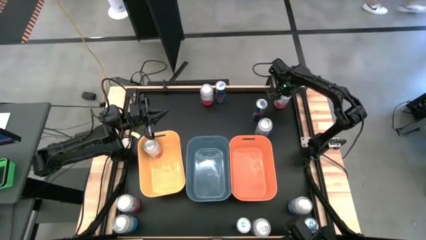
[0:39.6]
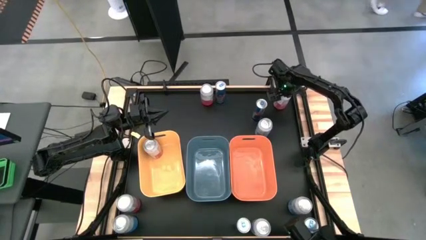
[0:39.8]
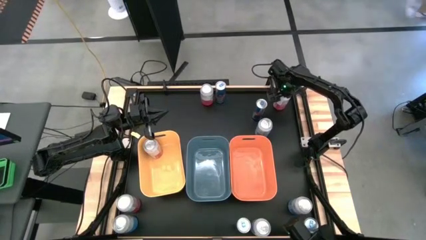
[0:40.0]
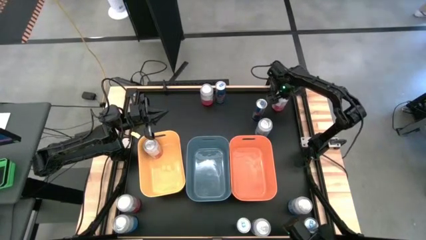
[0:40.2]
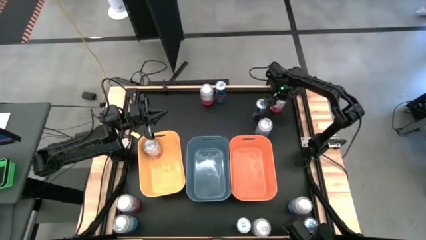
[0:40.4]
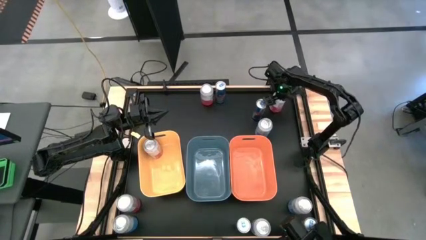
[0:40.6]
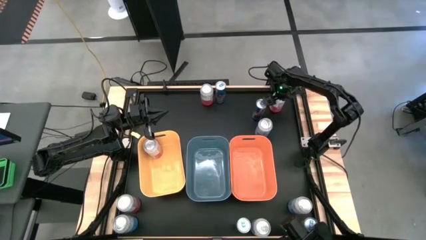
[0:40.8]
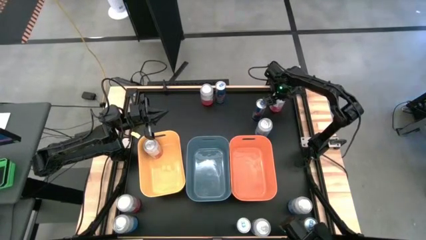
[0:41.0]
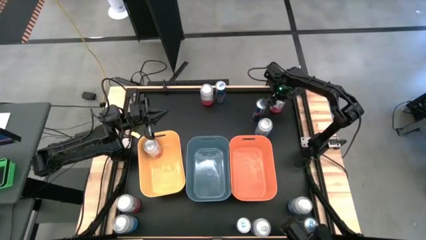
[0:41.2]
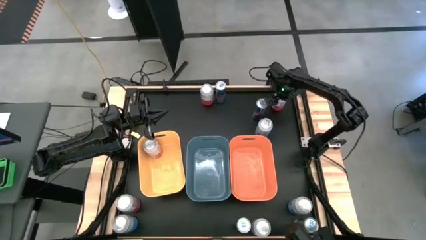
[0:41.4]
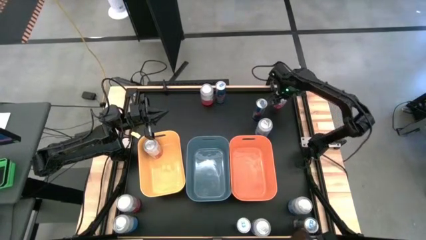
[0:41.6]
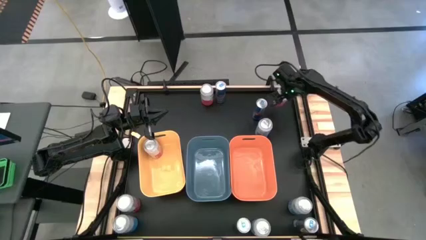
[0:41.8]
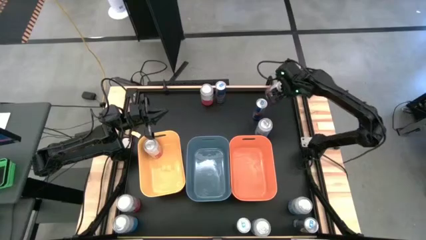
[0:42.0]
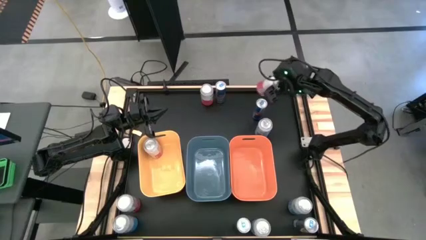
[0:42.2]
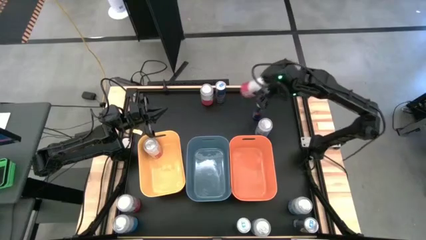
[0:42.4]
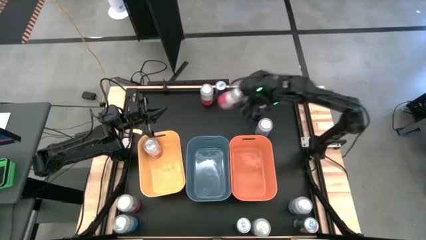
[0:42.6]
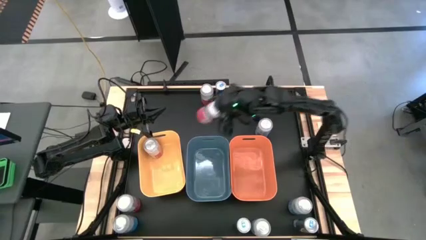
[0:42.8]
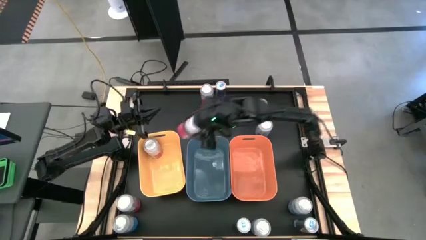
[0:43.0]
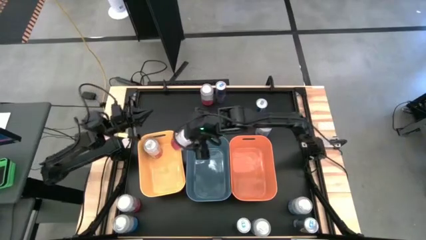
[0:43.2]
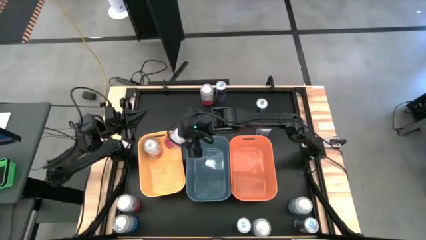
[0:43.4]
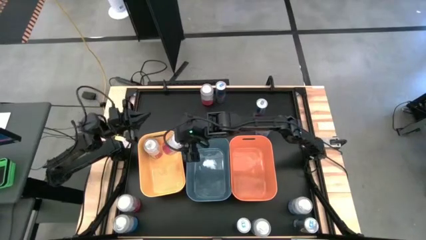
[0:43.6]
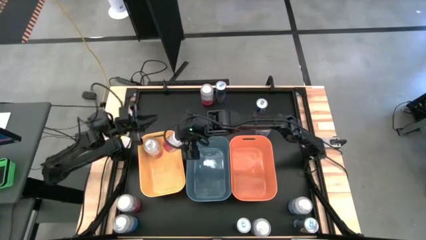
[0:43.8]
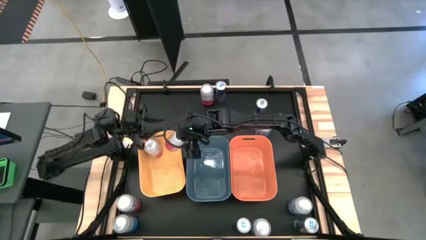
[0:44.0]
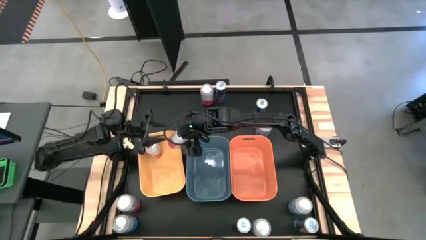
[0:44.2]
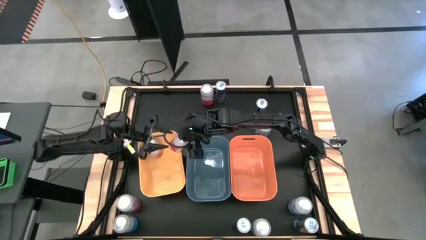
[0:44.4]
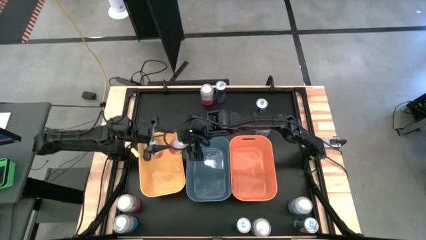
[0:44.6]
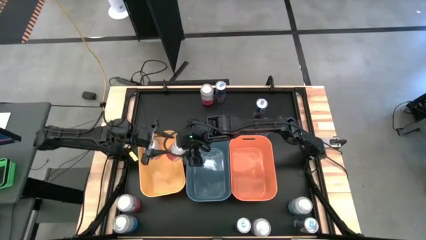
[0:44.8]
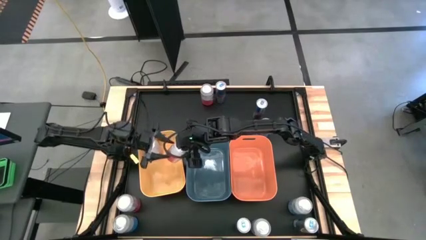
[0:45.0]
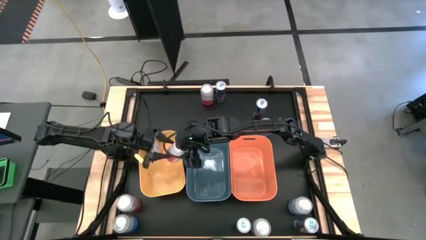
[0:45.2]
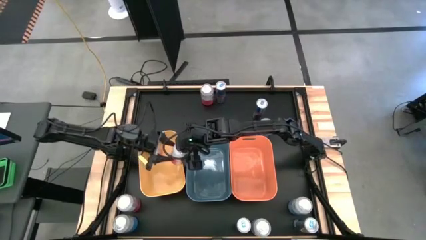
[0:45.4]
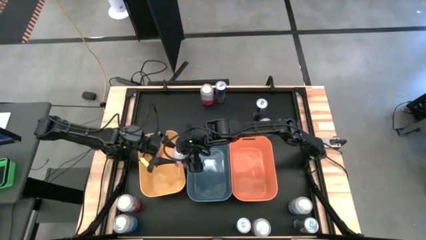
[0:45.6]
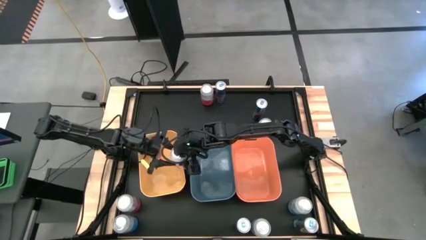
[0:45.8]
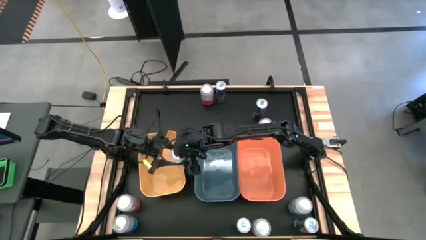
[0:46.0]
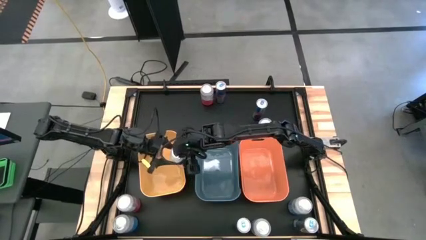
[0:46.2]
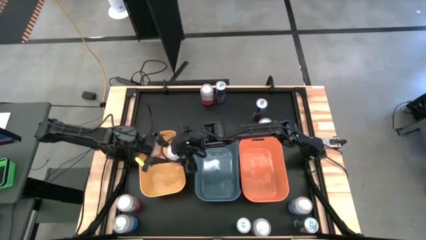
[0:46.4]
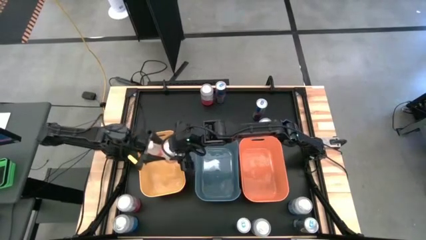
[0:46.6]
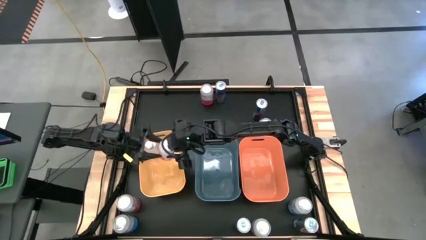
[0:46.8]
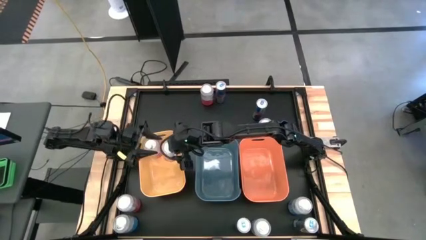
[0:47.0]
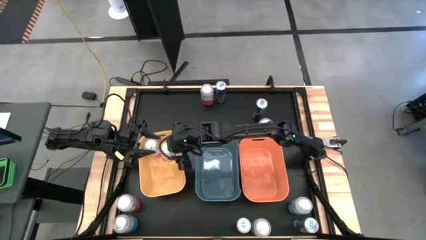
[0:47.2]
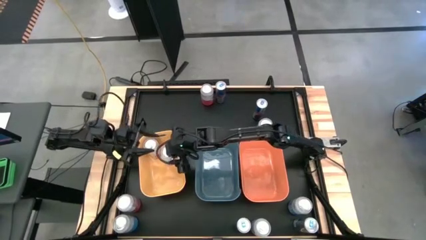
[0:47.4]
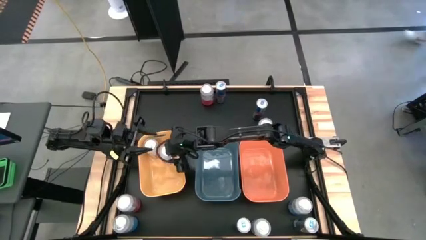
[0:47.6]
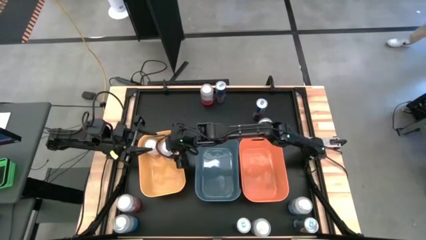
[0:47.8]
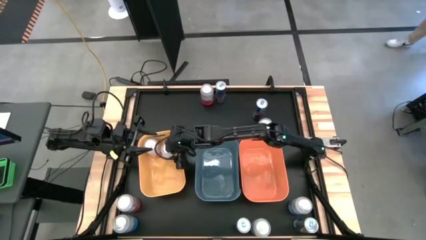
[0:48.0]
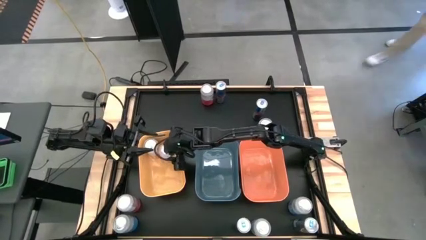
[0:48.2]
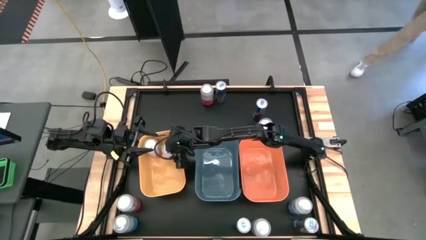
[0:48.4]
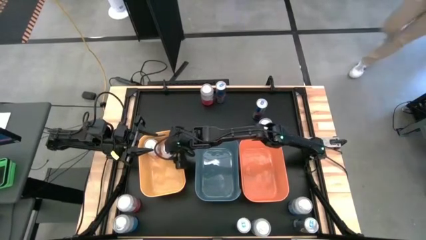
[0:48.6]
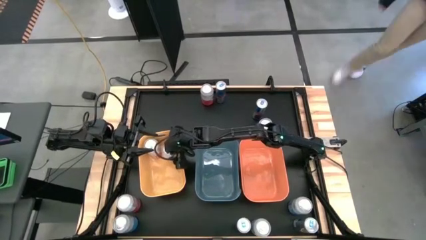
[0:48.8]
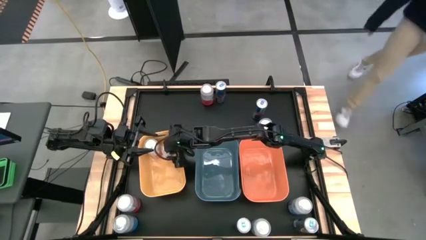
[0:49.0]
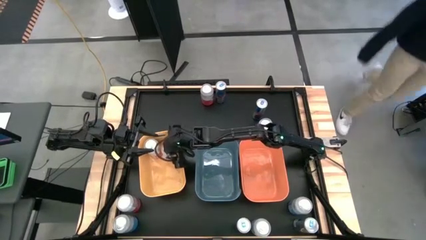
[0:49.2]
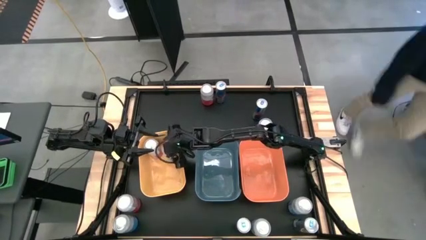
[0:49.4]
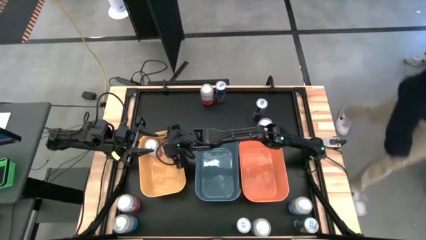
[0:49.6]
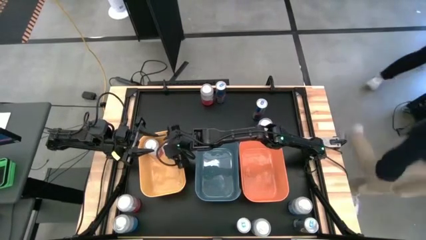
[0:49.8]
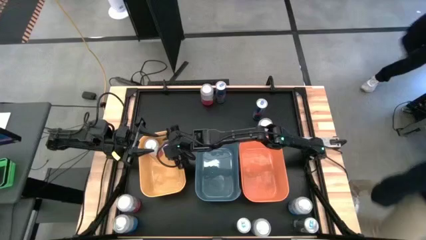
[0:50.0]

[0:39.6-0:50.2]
Task: Sort soda cans
Put the top right pink-white soda can into the yellow bin

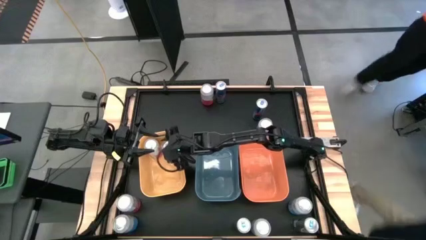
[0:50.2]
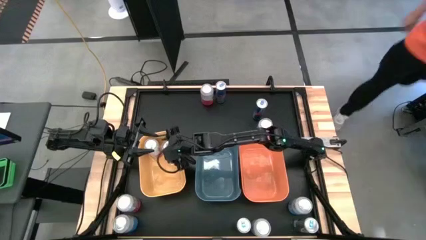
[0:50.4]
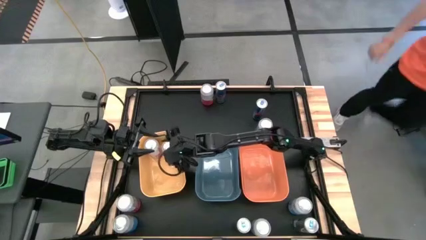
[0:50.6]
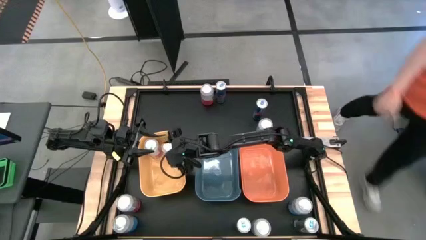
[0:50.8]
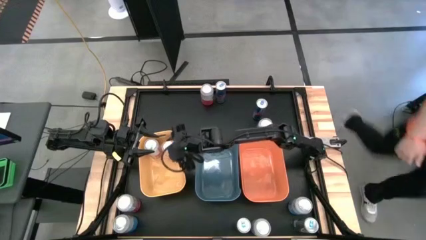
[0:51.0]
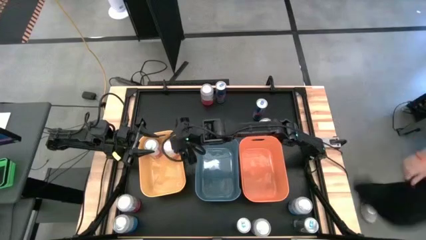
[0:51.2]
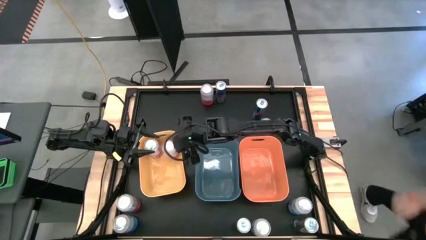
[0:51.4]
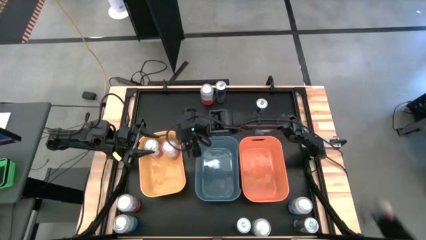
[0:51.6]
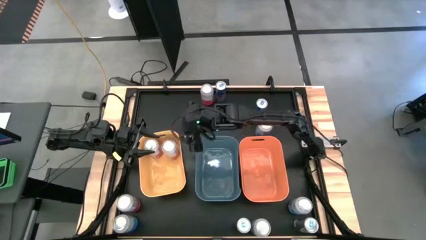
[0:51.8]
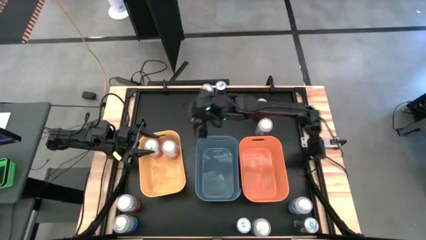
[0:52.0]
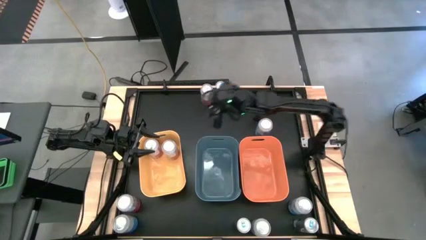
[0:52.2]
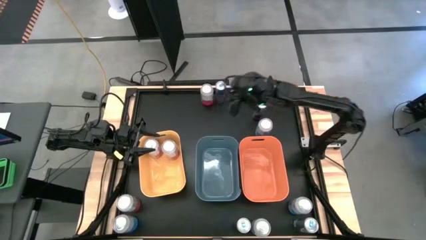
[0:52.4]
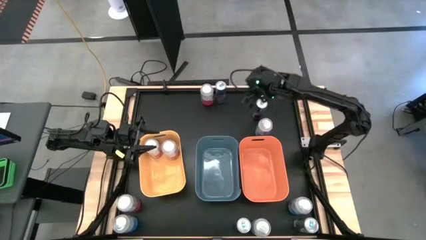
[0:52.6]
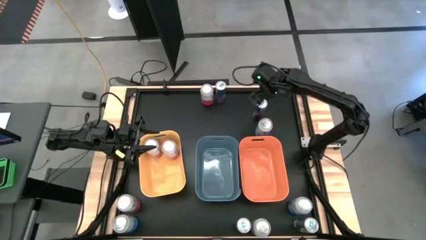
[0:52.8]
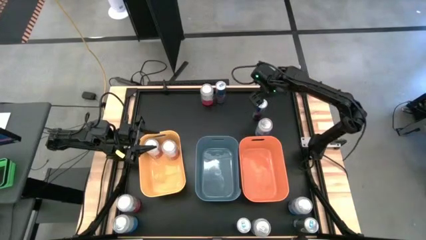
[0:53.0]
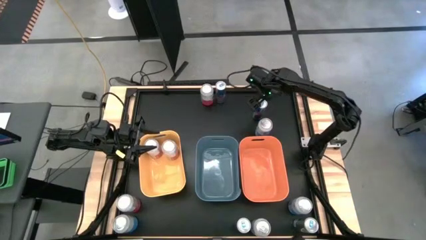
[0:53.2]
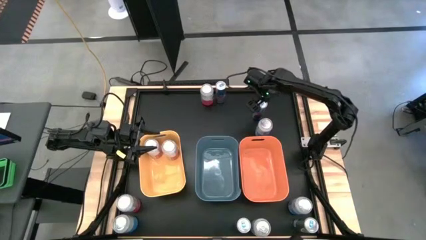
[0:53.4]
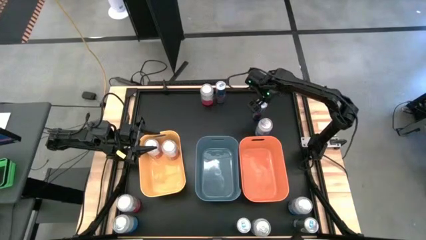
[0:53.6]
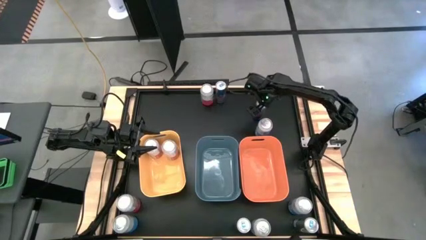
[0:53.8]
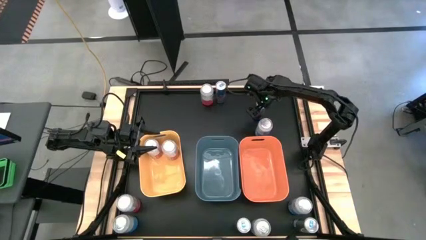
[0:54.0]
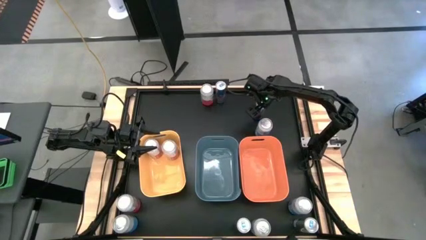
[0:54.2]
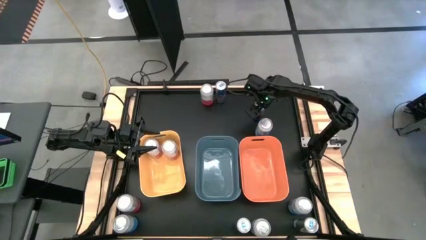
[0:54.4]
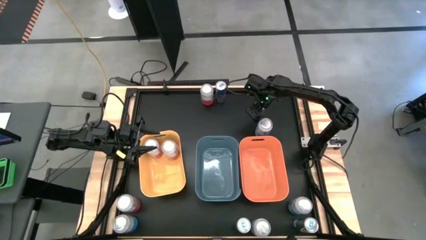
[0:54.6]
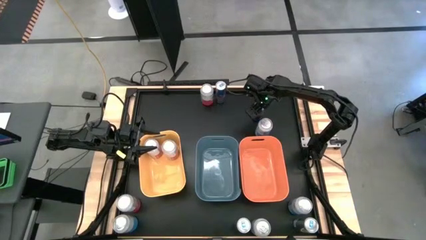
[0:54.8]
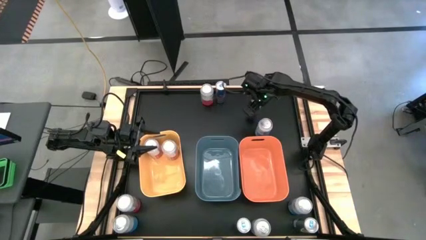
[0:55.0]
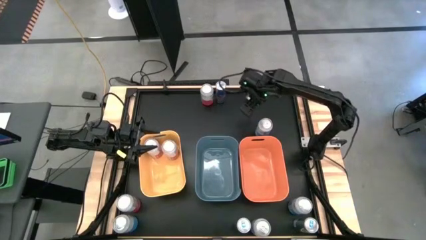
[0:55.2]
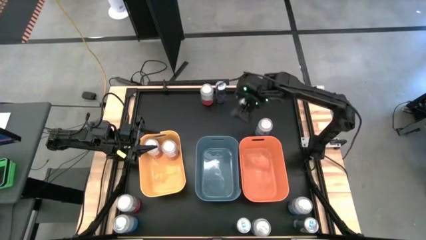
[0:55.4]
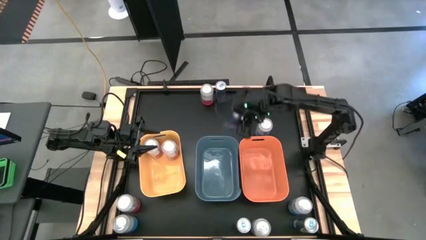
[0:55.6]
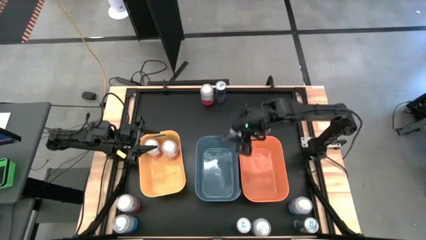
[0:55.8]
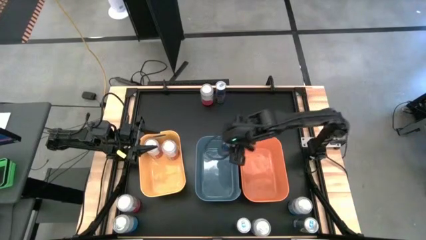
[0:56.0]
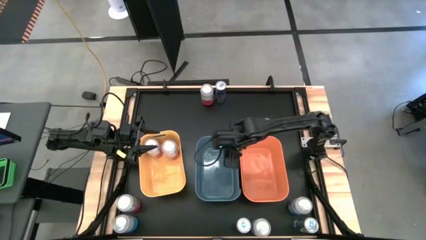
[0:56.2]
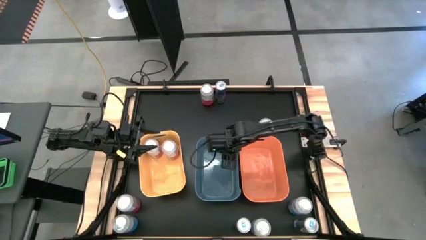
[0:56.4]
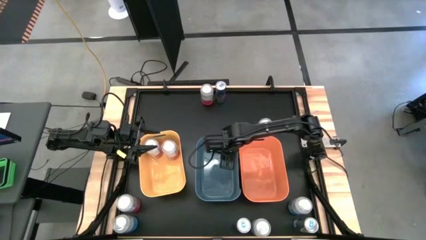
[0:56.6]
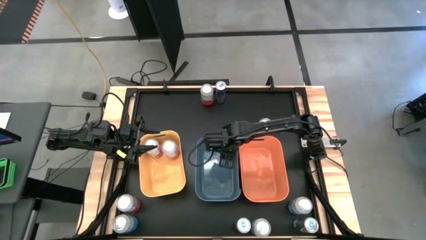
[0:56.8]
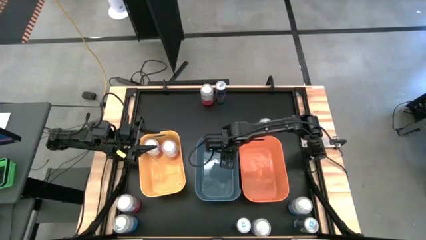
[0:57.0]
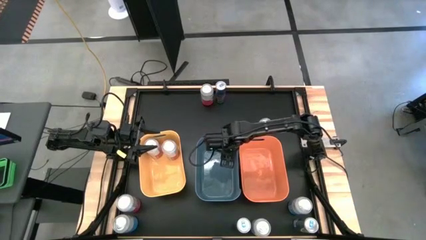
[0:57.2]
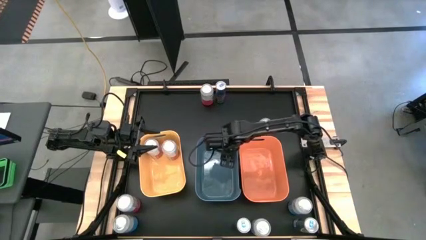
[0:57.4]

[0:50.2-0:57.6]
Put the middle blue soda can into the blue bin
